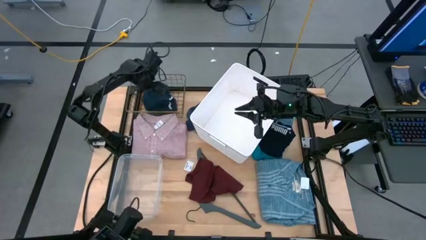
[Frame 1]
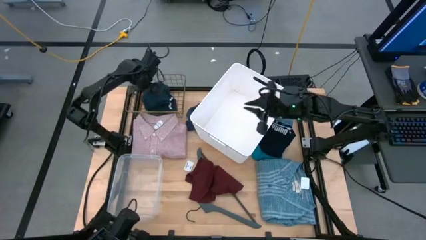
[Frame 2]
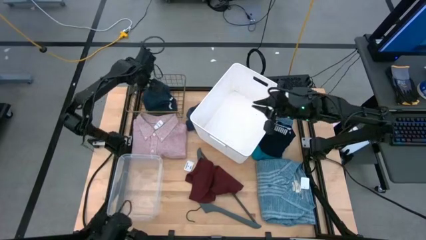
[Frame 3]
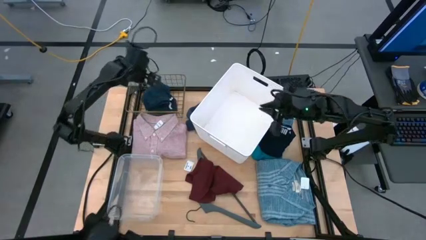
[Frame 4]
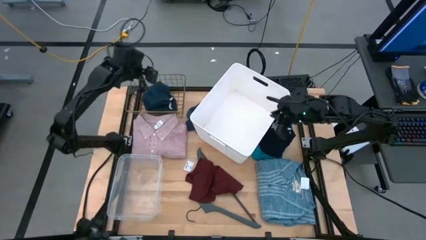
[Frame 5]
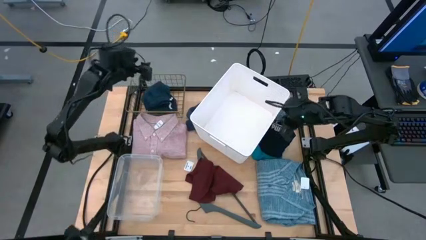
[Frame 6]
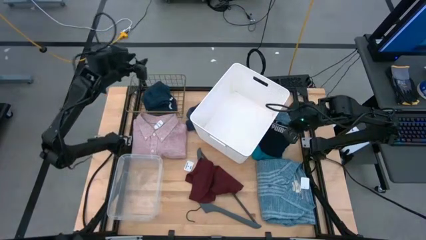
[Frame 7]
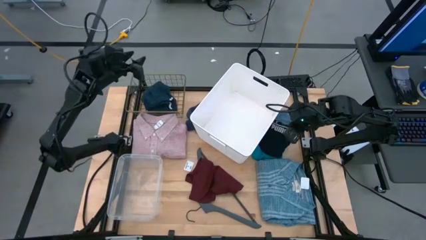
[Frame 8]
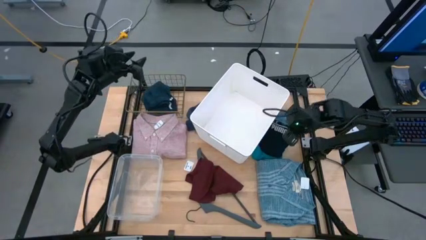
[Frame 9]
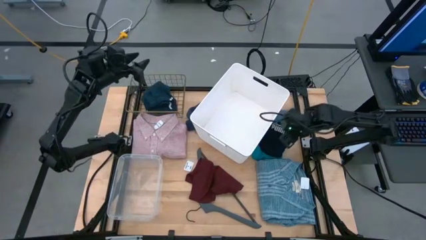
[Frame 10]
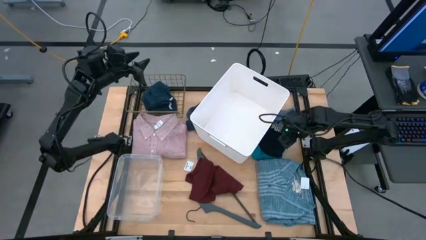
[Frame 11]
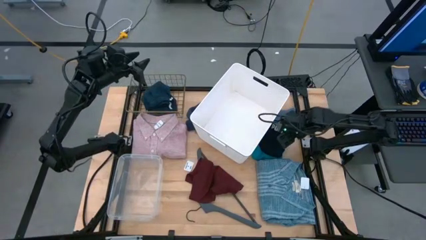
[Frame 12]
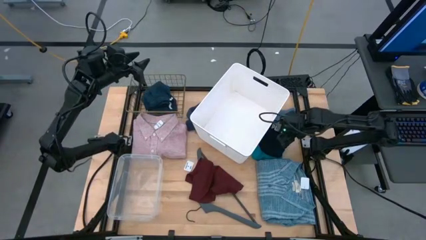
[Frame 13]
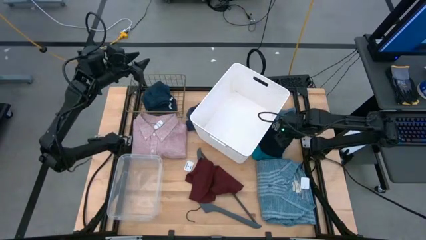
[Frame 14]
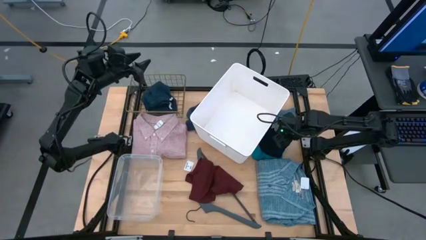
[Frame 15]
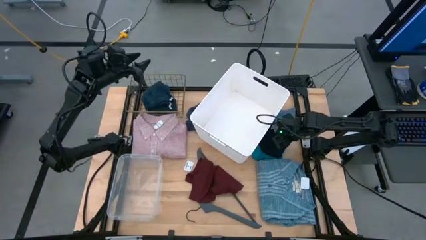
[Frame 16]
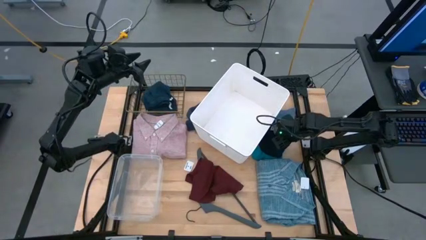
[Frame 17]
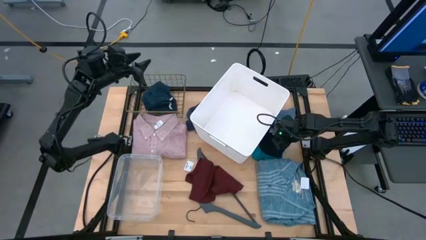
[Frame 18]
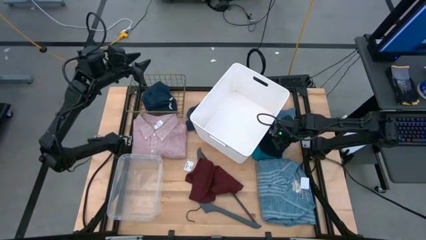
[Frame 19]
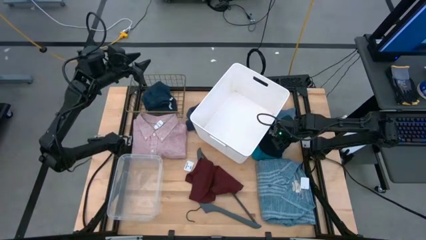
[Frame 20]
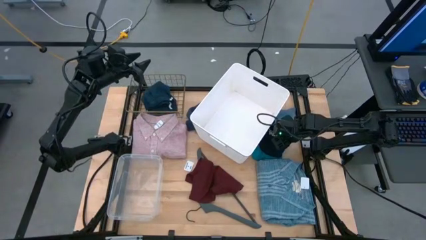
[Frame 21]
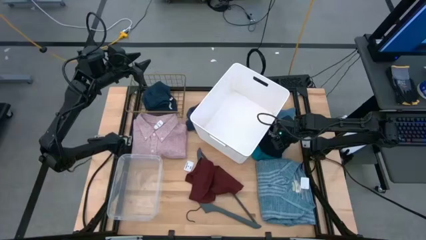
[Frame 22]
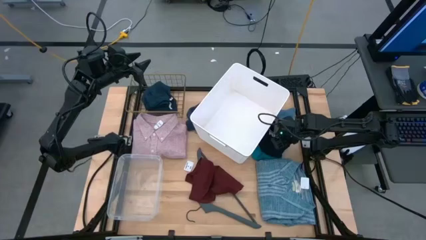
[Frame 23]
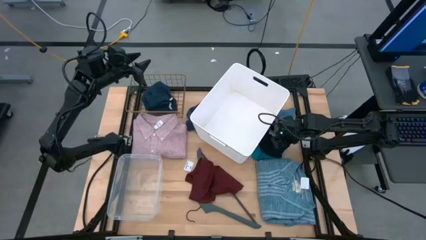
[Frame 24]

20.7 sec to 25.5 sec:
Task: Pick & Place Cloths
Put the dark blue boxers into the brown basket

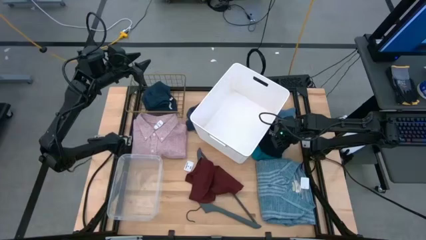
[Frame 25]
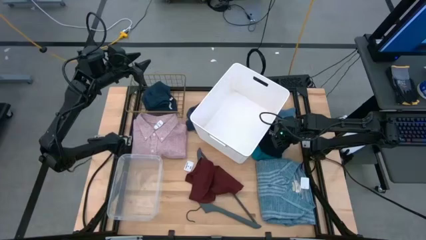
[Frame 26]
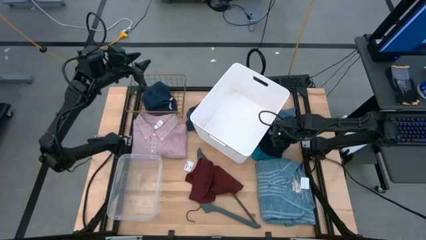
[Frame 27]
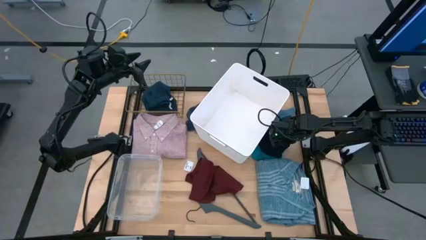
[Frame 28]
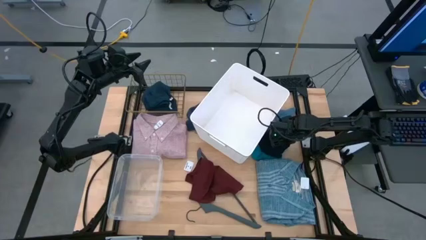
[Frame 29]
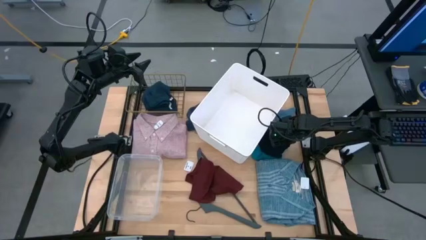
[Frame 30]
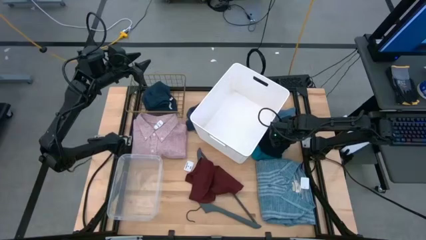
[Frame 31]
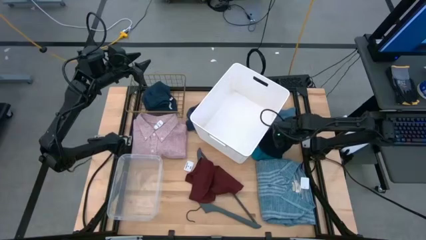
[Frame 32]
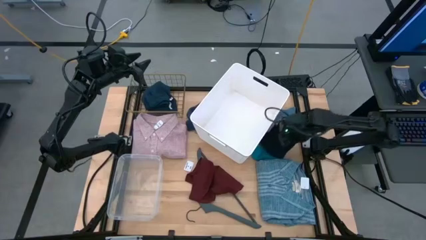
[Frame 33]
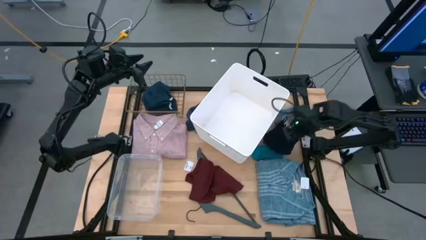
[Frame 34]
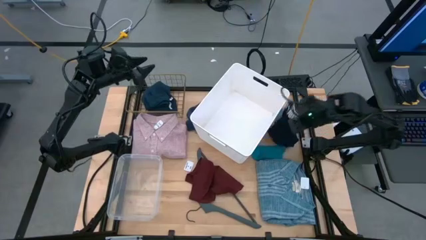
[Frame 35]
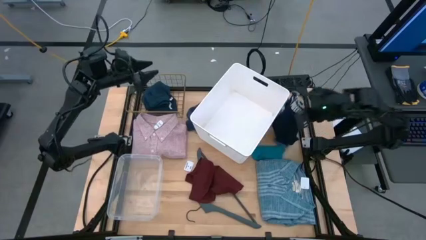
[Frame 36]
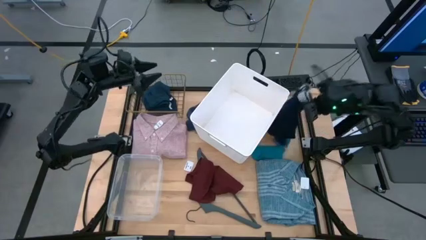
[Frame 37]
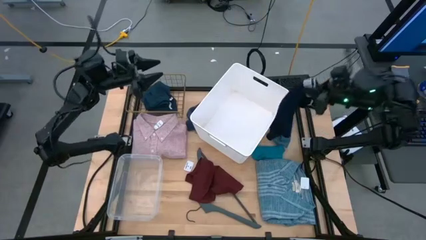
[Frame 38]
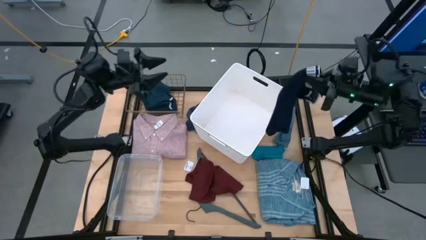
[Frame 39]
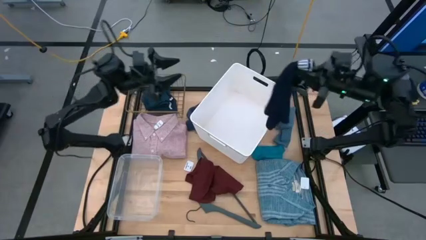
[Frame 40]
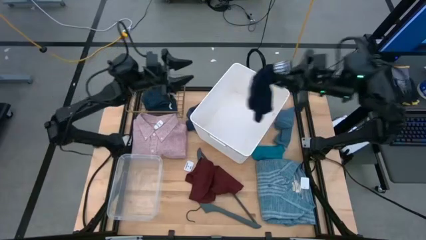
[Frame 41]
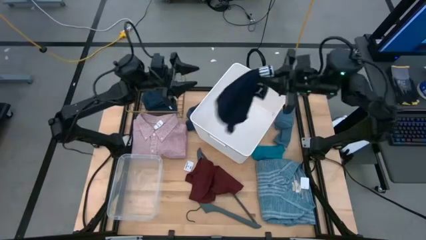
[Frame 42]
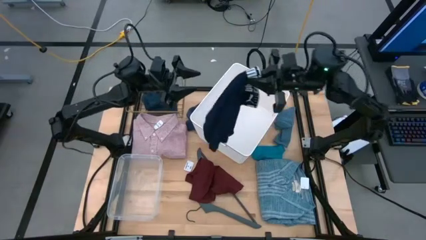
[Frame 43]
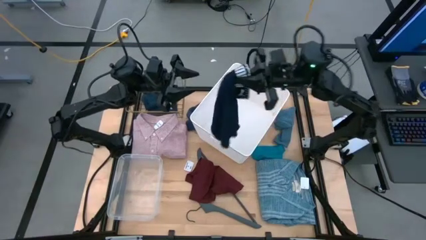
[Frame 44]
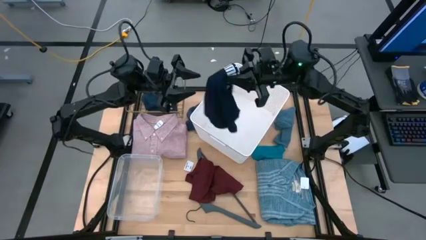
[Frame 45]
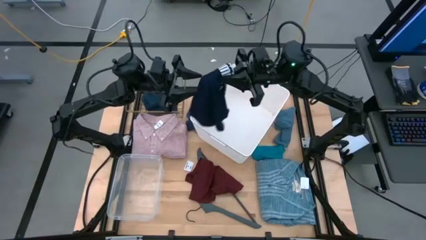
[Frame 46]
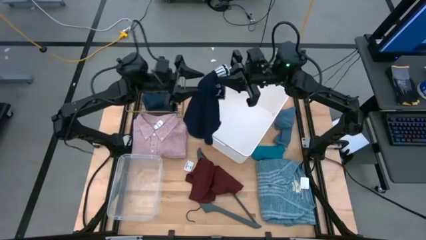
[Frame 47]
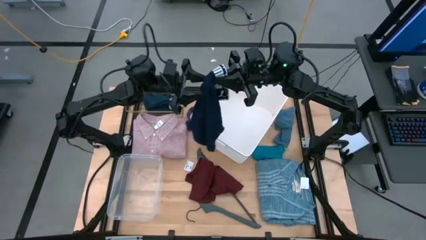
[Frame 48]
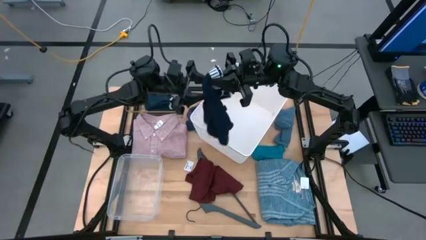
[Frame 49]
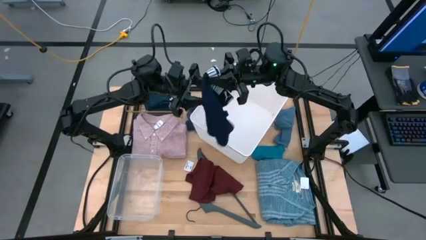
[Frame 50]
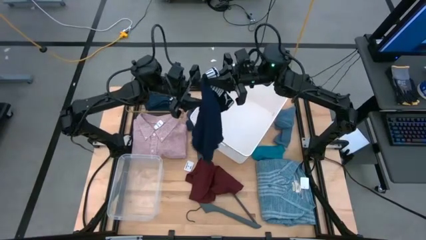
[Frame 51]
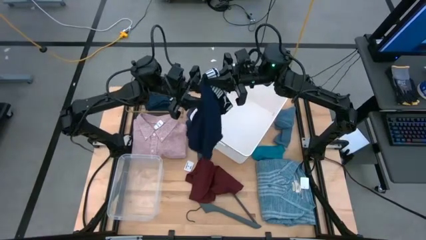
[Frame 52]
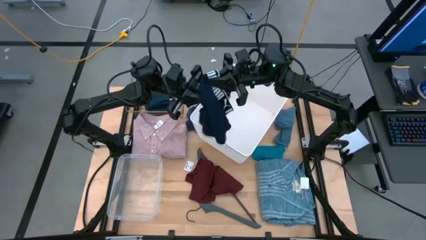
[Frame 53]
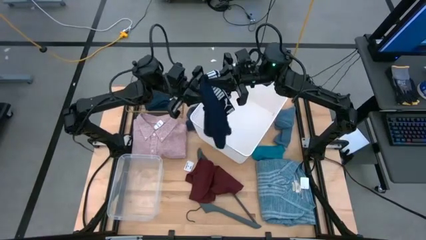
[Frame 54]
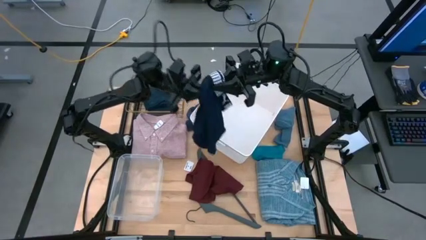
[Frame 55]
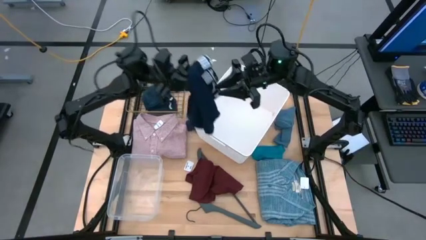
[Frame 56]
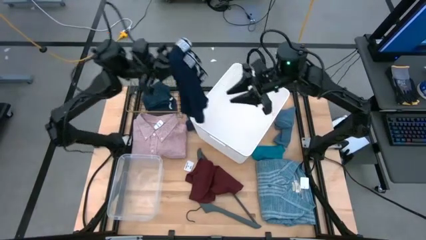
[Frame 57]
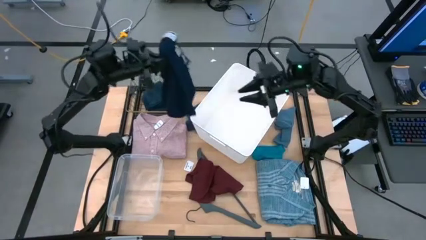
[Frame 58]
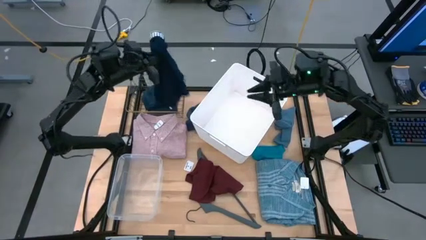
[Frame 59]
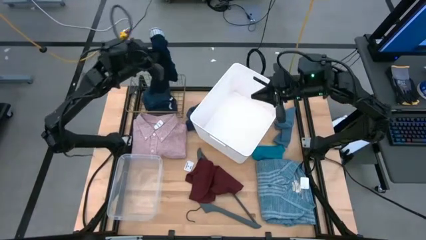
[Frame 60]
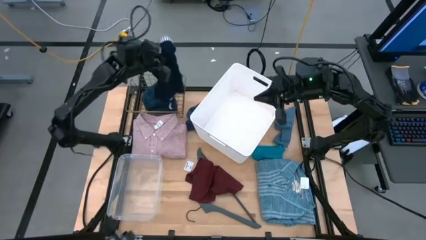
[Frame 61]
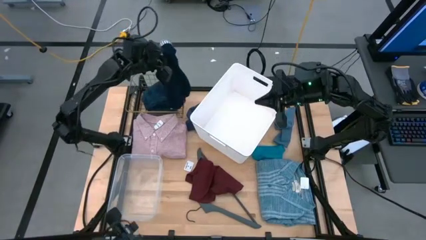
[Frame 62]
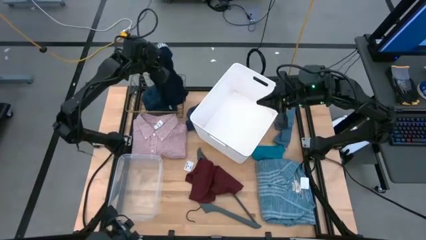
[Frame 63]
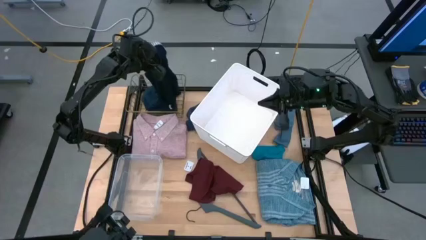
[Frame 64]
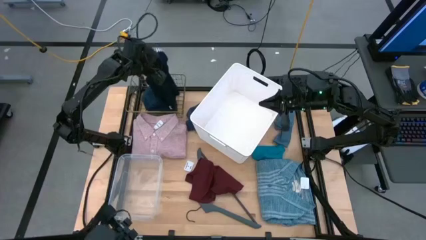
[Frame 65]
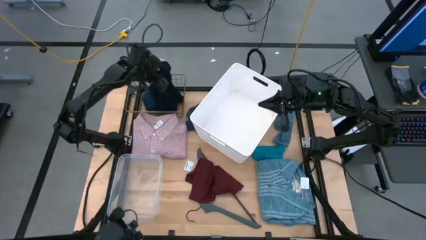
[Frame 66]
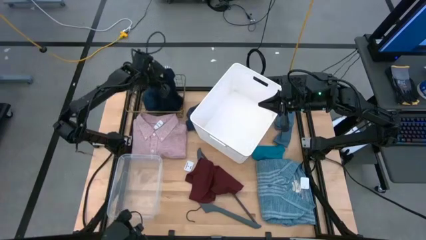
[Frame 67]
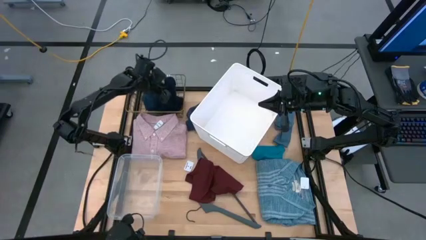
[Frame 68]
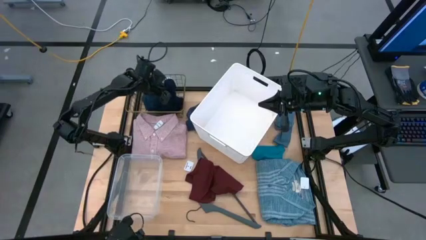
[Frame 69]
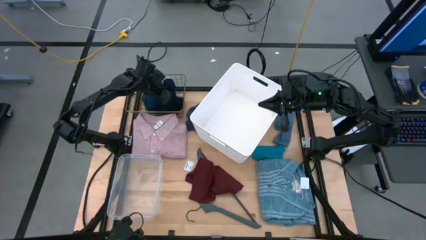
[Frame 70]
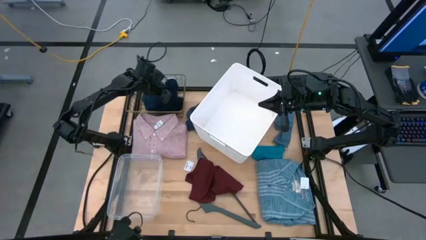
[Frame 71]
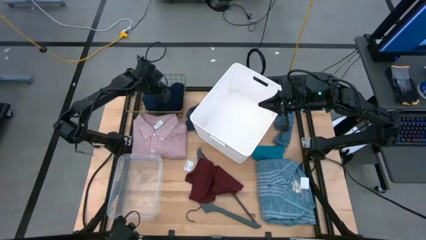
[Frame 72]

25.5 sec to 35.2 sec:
Put the dark blue boxers into the brown basket
